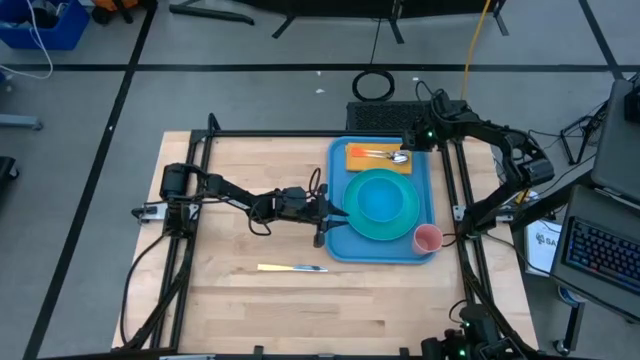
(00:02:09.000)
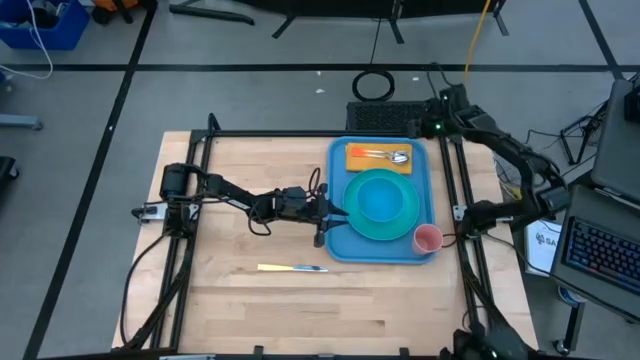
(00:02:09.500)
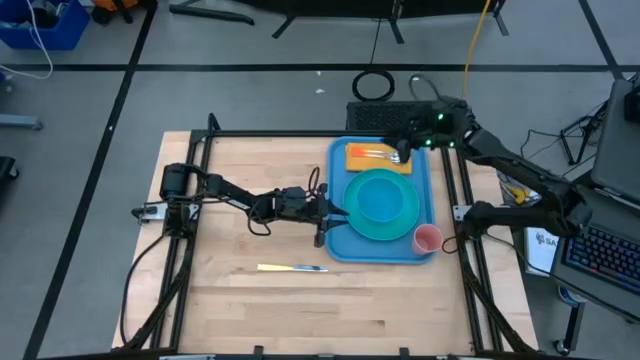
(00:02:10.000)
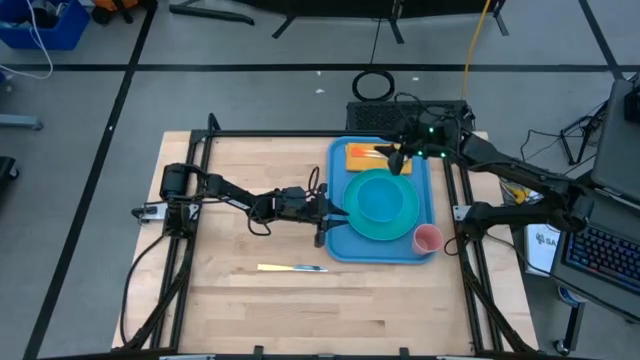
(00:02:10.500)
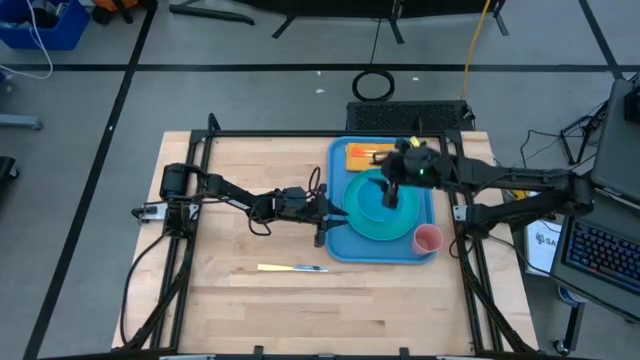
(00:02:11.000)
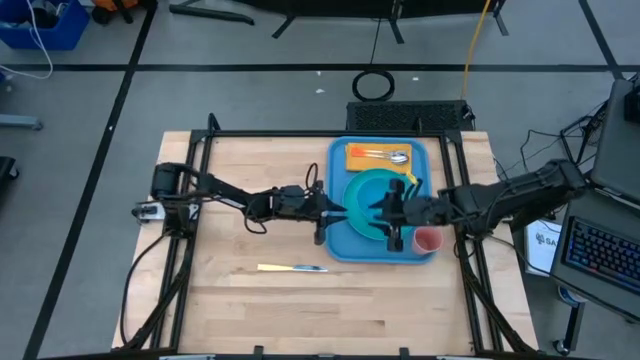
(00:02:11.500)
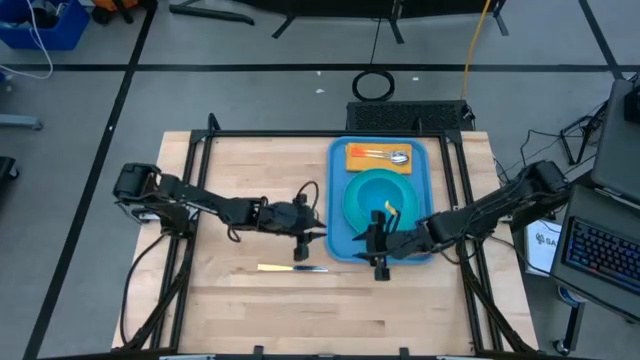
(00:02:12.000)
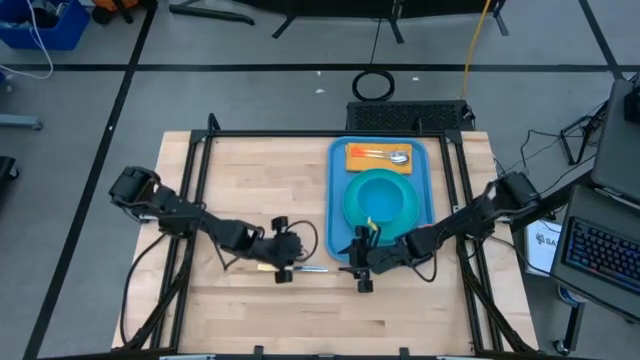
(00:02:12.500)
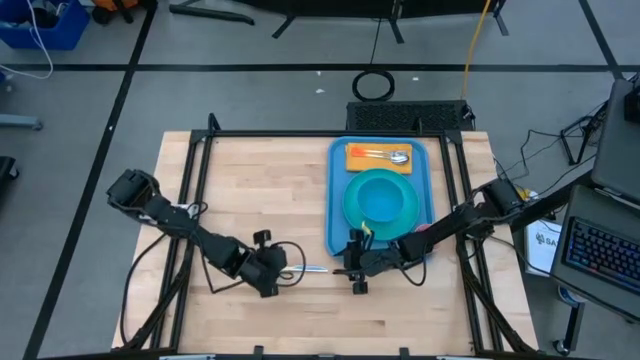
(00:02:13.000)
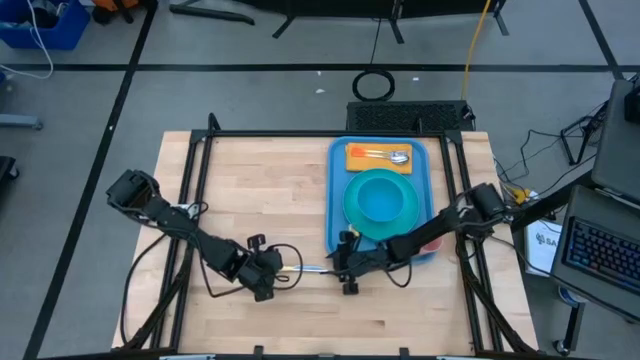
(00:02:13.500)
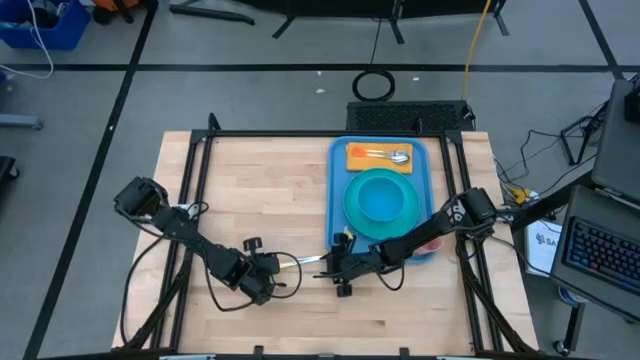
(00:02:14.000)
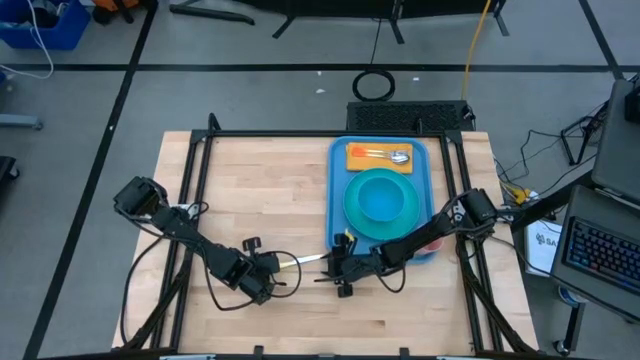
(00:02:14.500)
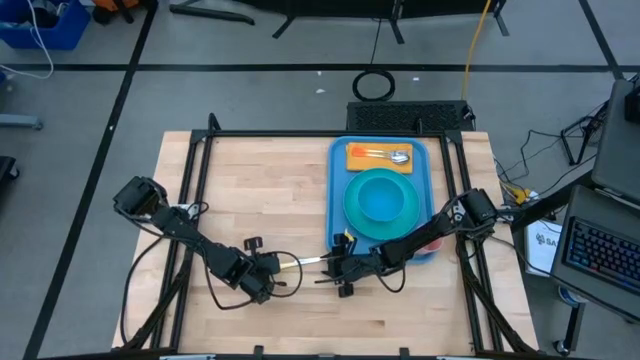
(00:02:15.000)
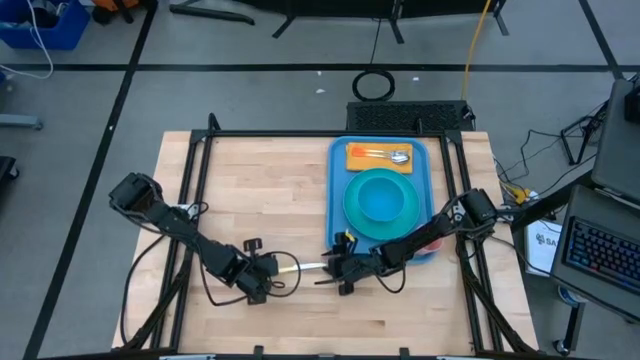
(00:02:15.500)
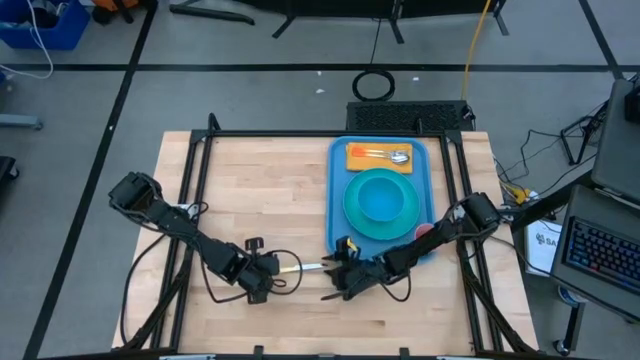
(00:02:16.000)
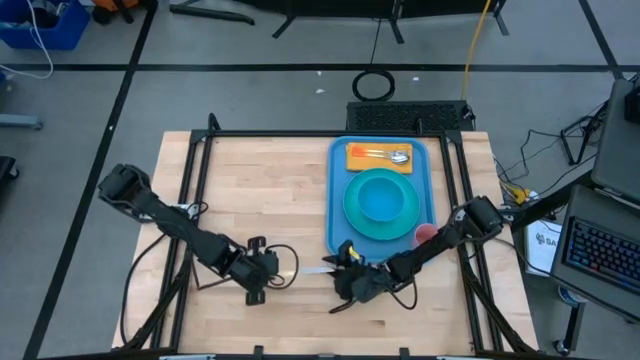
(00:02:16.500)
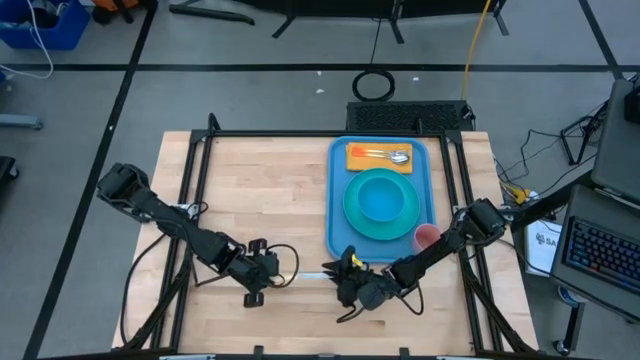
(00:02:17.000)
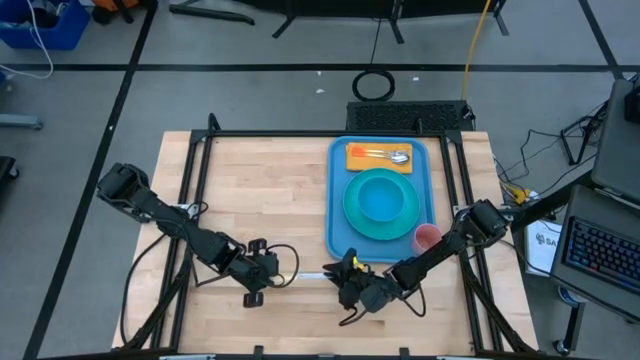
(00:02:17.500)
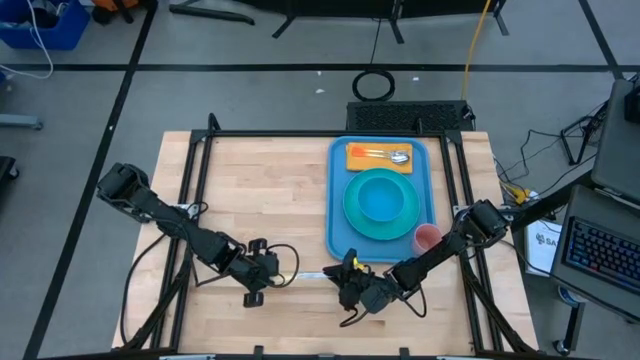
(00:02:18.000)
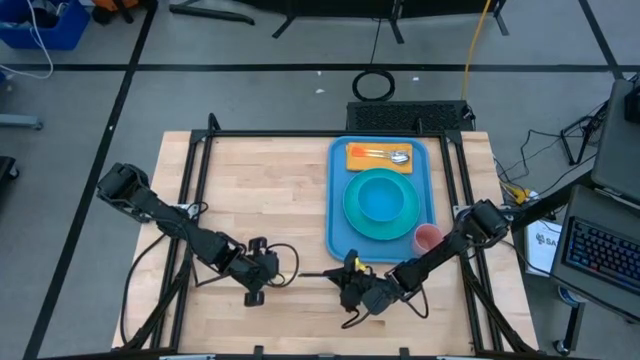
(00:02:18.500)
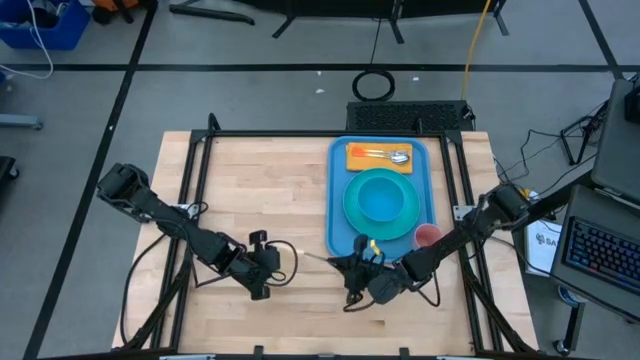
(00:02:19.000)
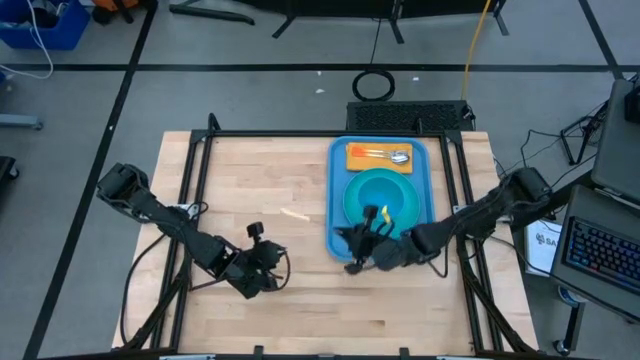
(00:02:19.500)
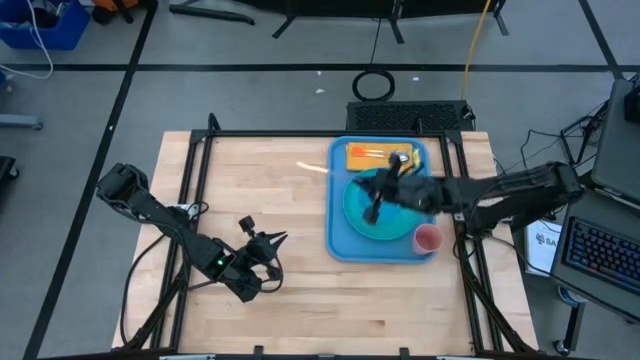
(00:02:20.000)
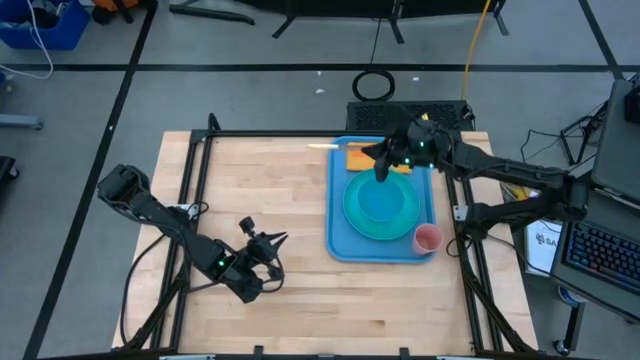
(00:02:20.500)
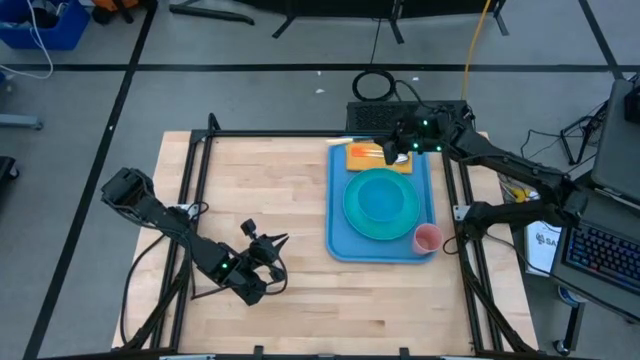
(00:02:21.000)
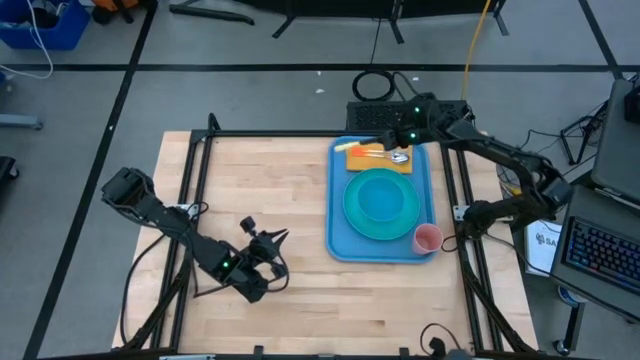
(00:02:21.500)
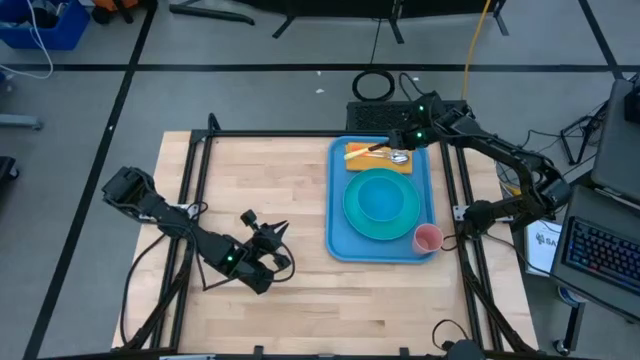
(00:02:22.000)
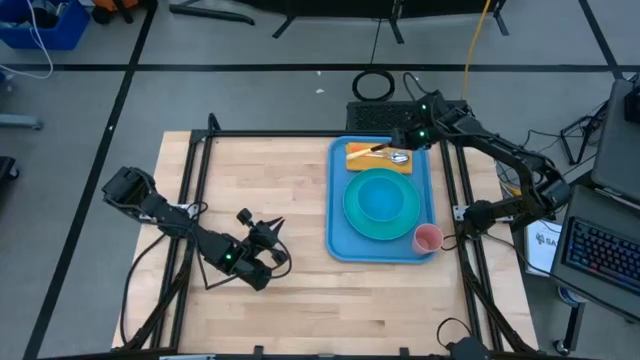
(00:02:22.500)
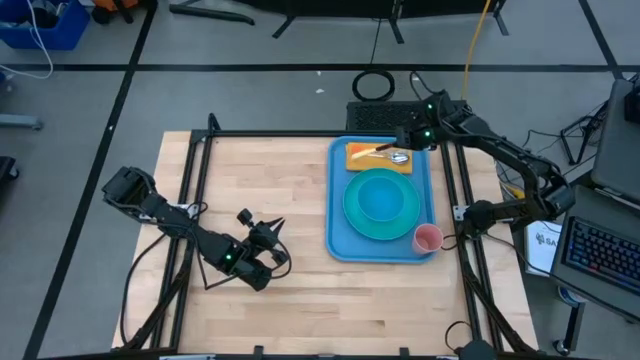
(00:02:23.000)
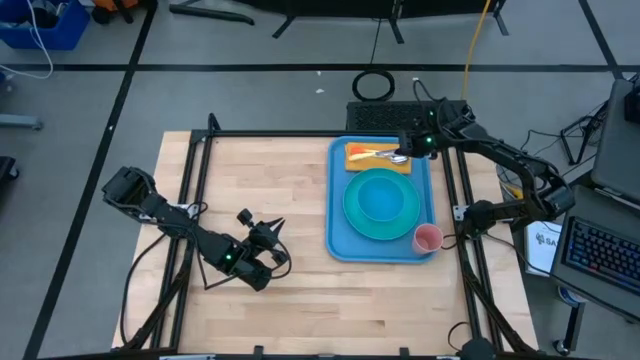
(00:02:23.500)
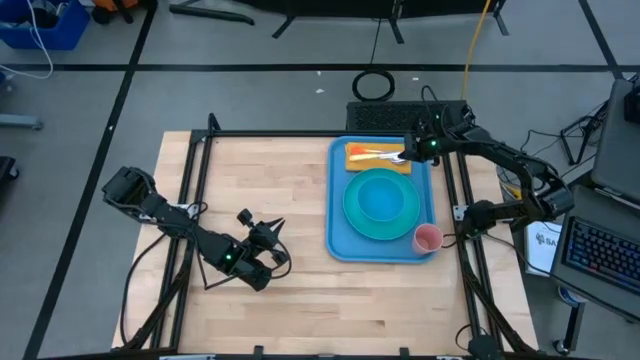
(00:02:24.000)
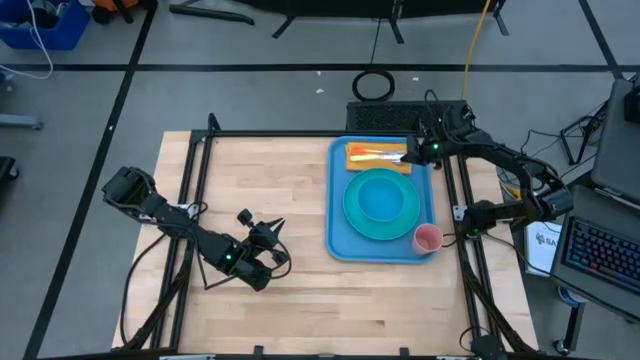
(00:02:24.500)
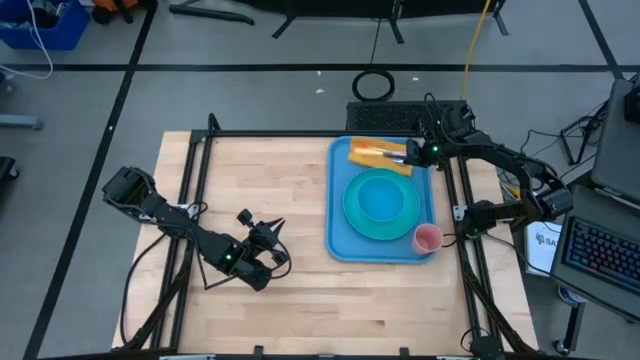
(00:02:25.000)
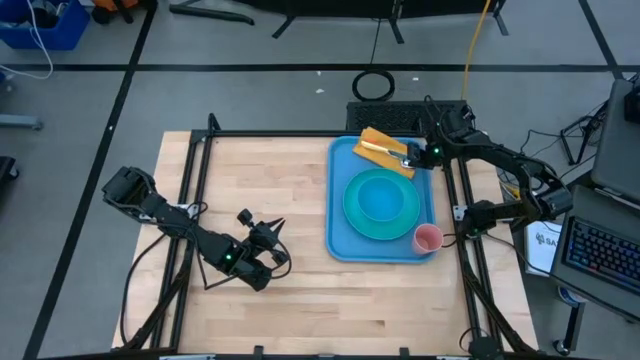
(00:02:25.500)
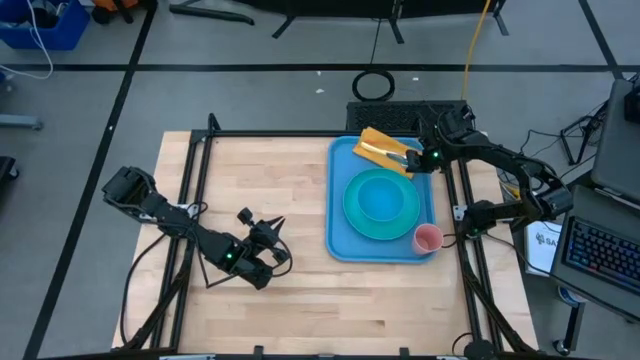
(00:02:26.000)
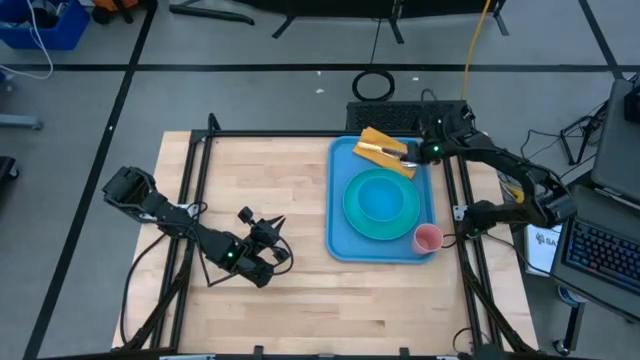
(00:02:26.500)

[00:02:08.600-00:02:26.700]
Task: Set up tray
Put the yellow table knife to the right of the orange spoon on the yellow table napkin on the blue serving tray

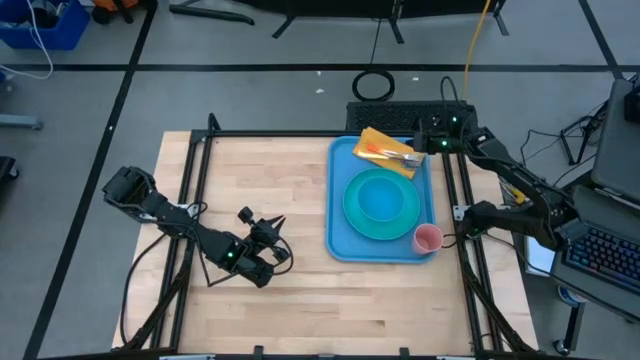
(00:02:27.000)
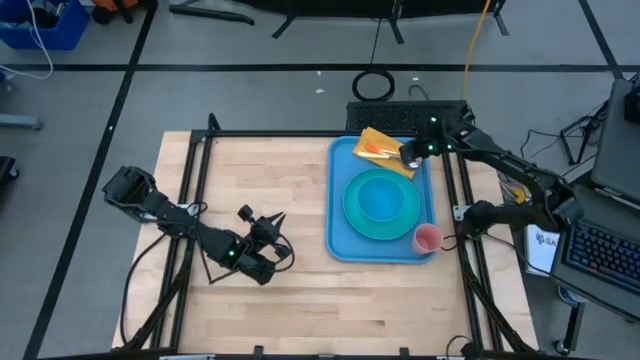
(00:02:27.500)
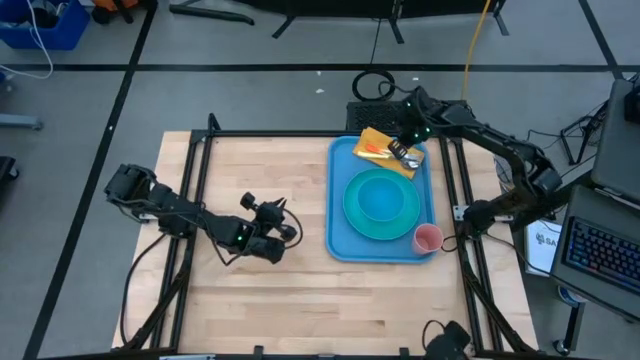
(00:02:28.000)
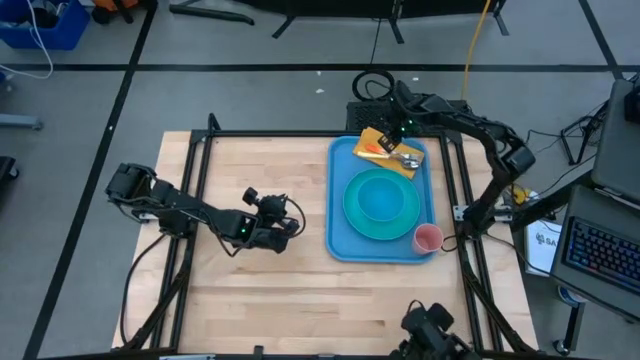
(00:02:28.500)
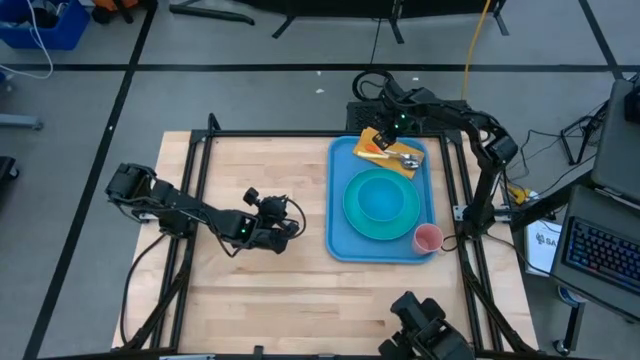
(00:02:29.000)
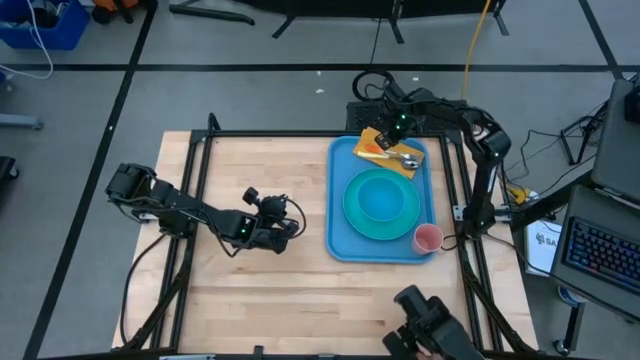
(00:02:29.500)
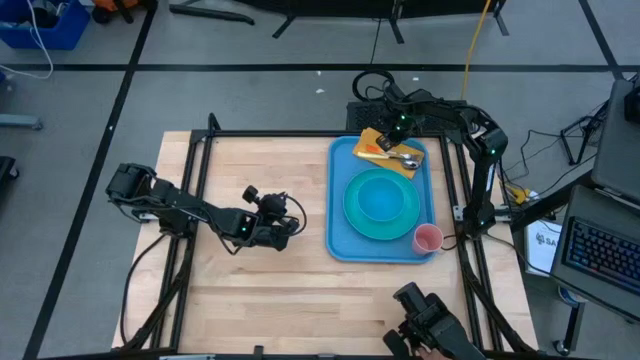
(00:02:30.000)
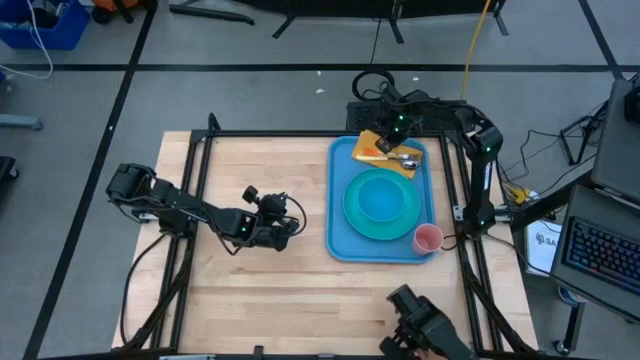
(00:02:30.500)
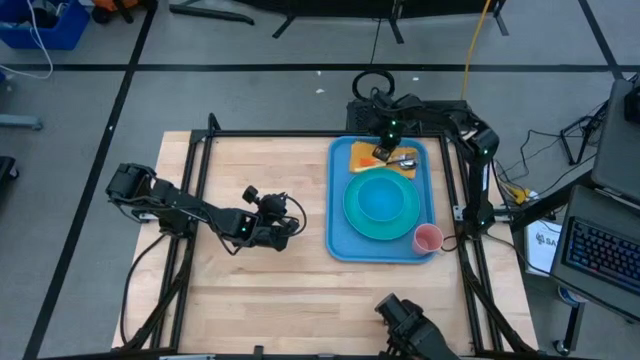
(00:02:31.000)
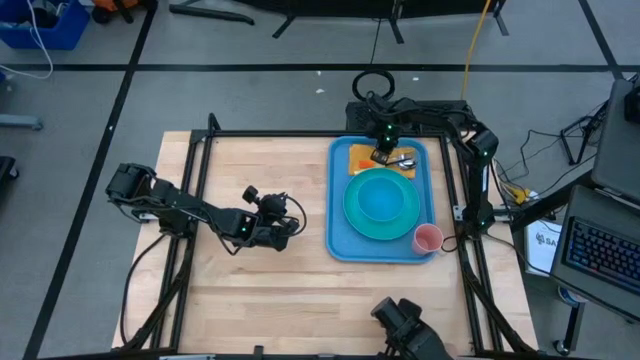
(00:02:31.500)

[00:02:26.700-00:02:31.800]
Adjust the yellow table napkin on the blue serving tray
